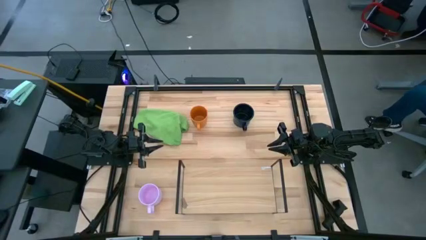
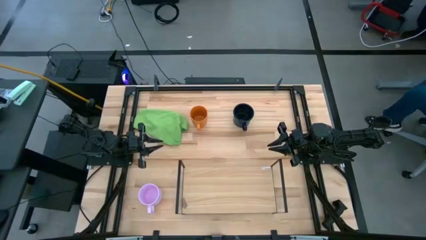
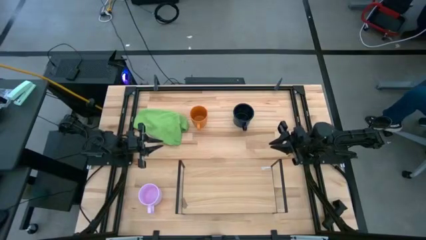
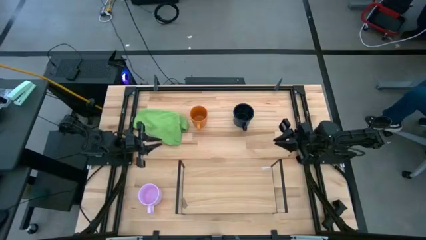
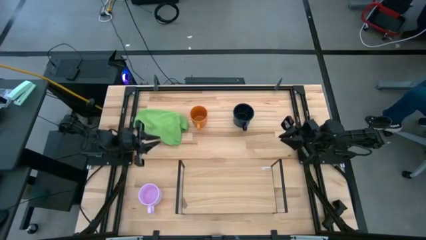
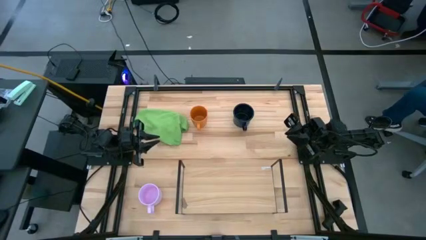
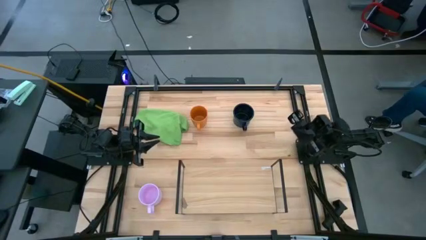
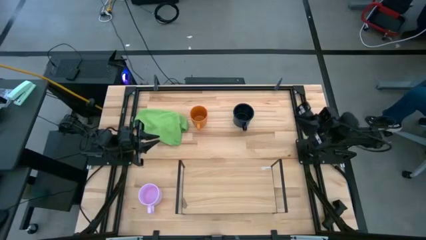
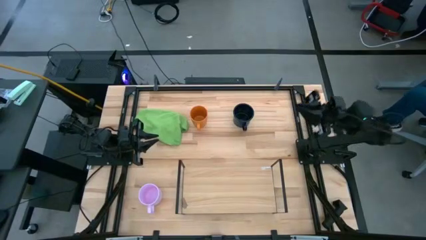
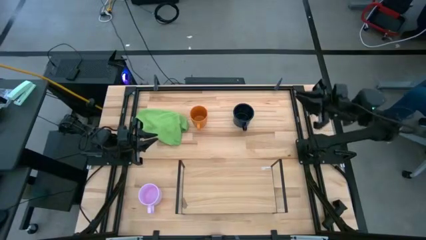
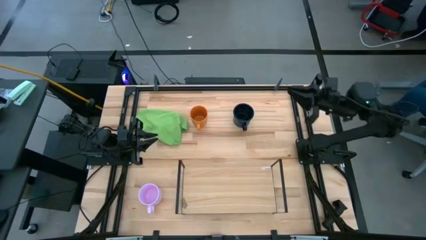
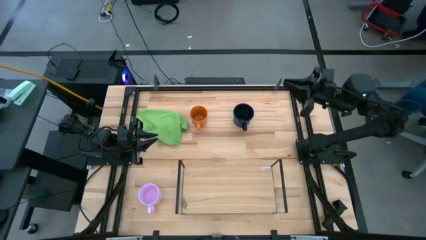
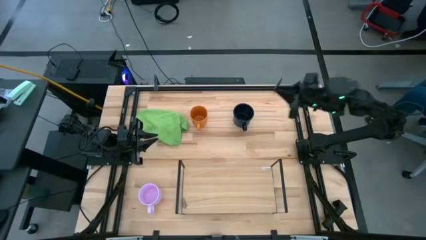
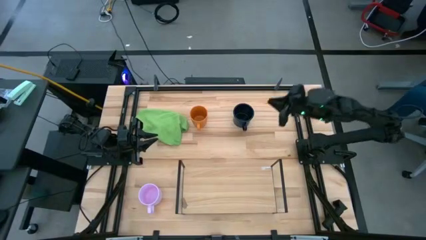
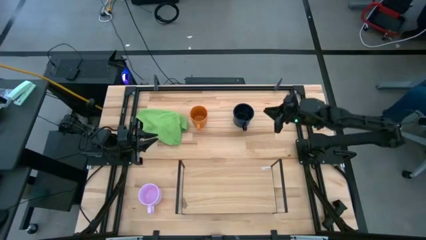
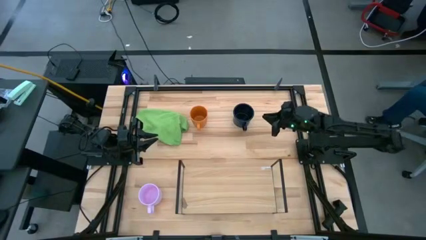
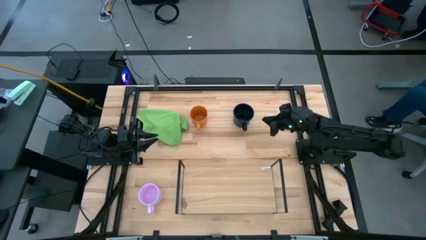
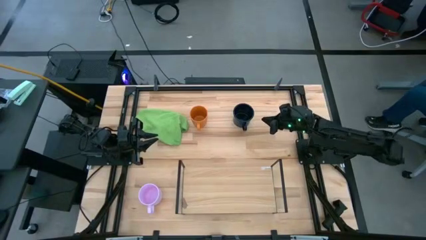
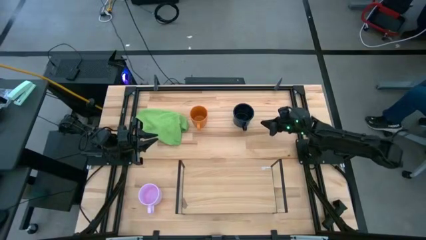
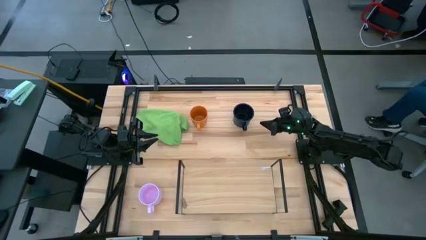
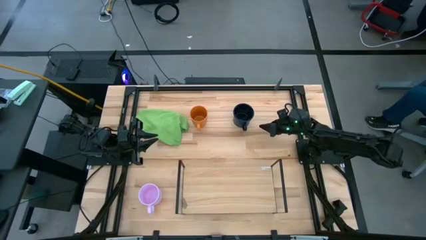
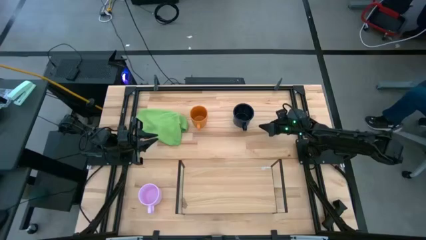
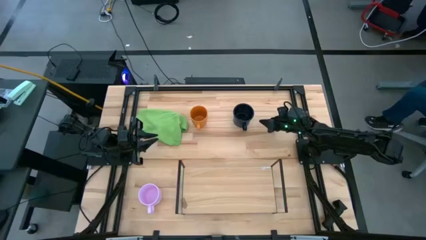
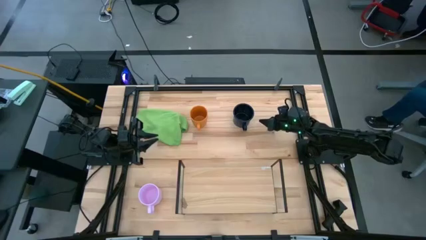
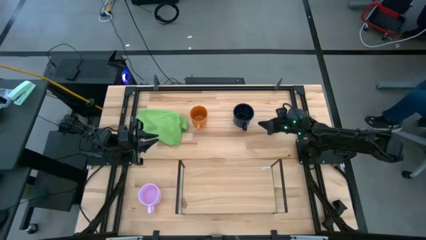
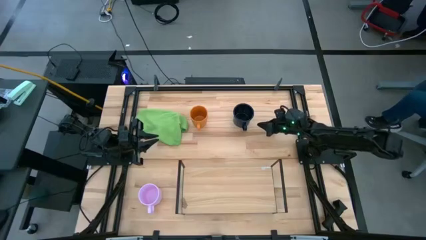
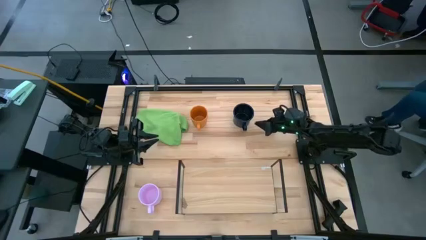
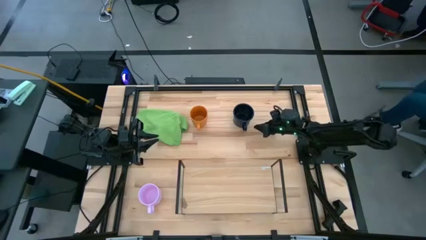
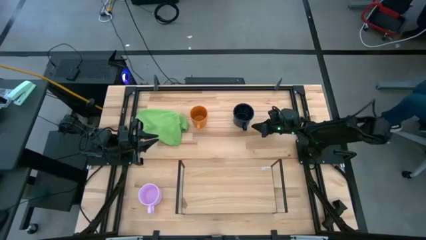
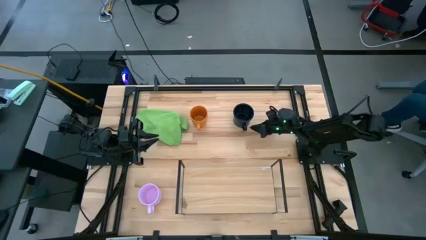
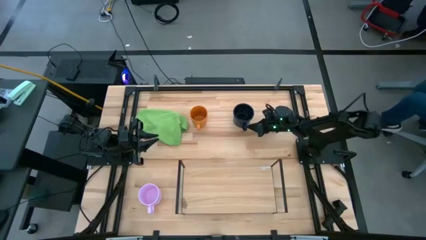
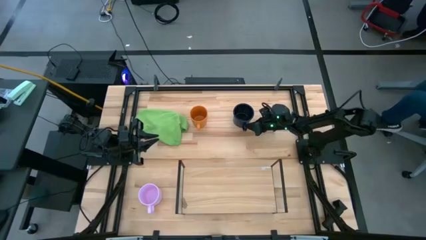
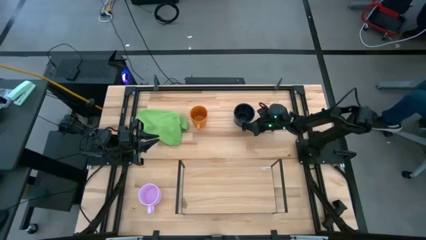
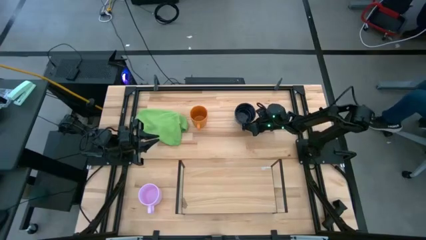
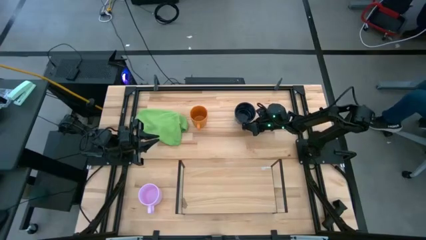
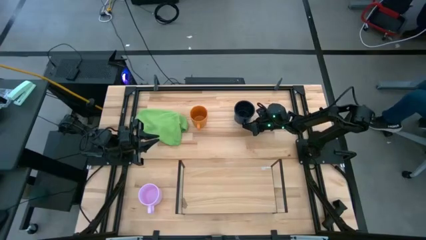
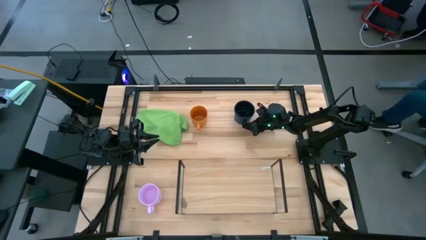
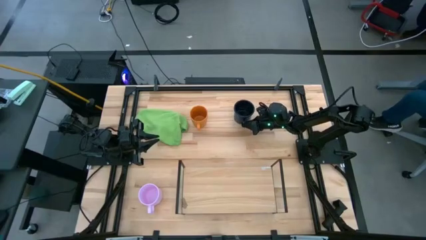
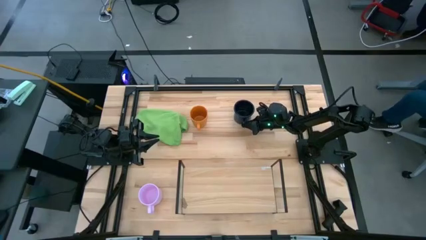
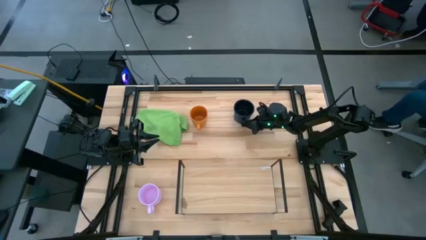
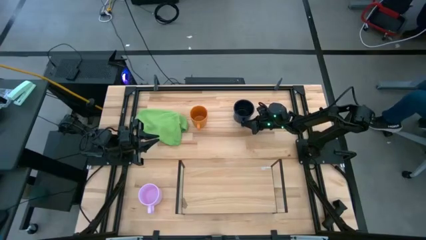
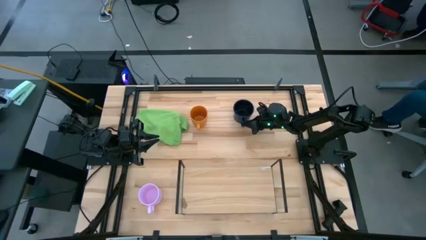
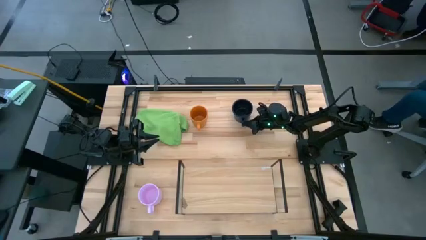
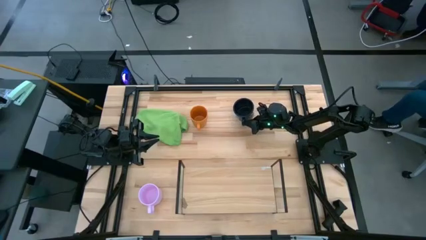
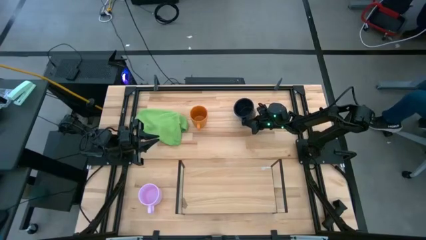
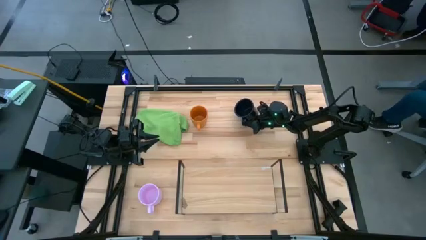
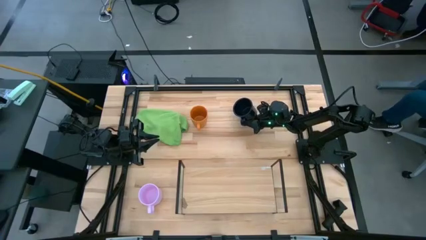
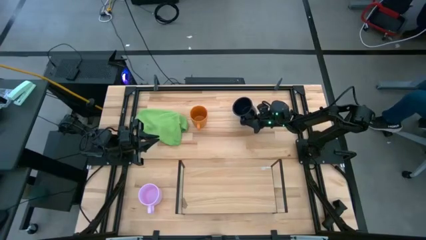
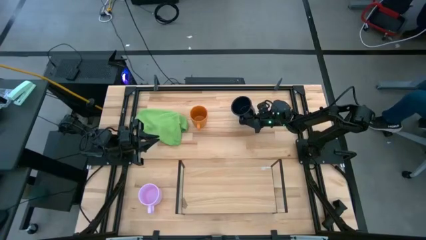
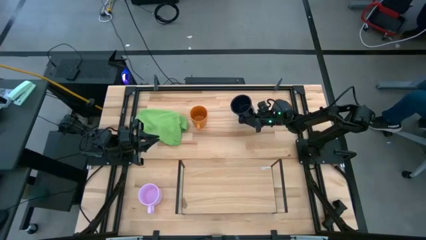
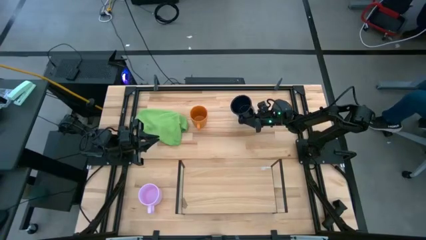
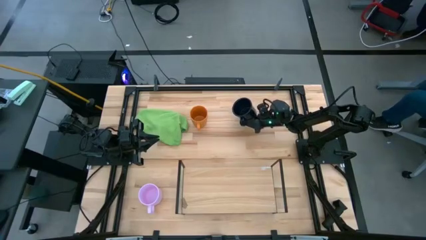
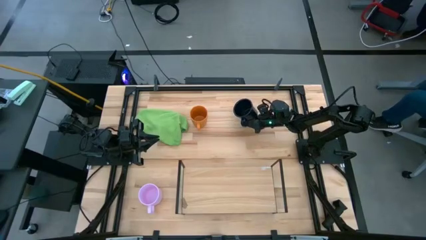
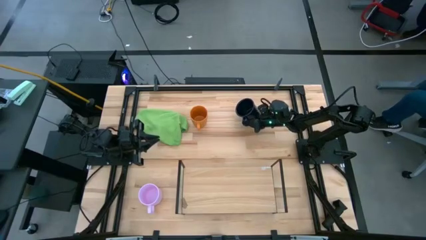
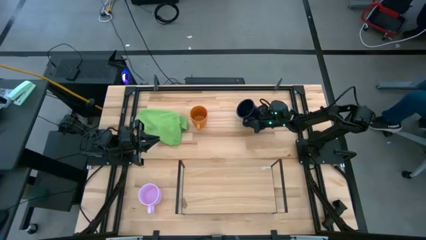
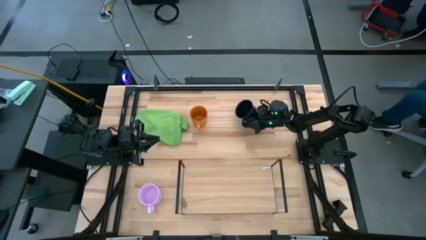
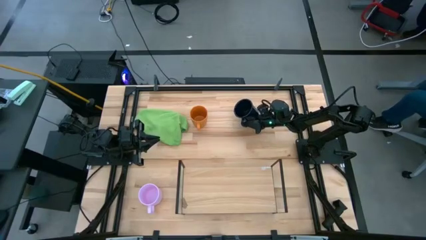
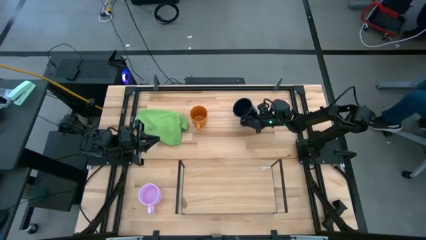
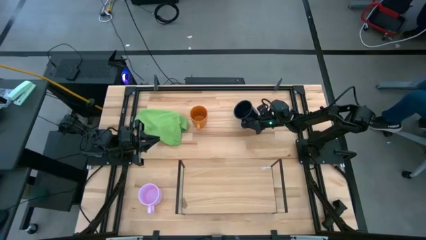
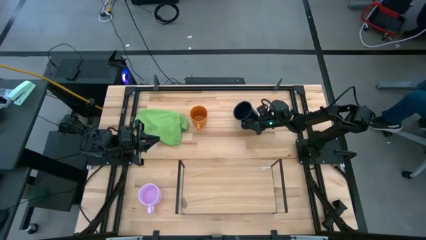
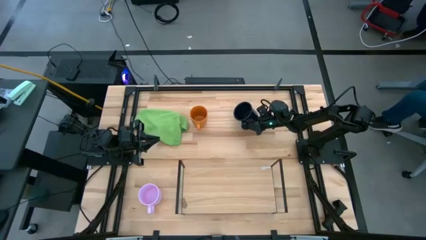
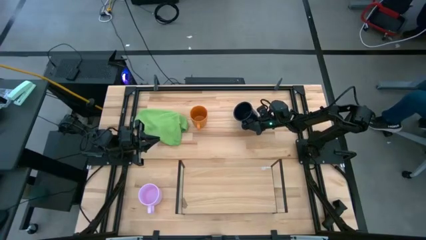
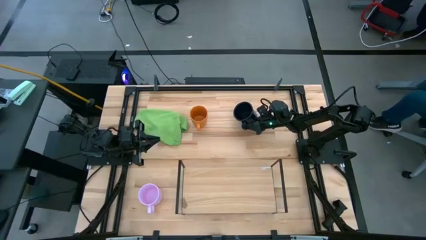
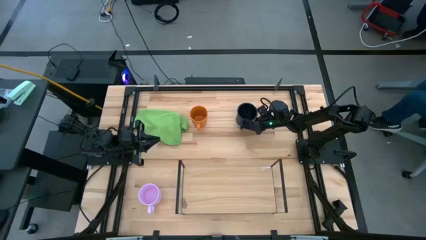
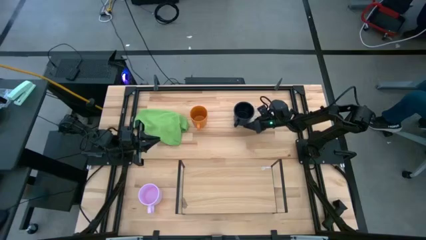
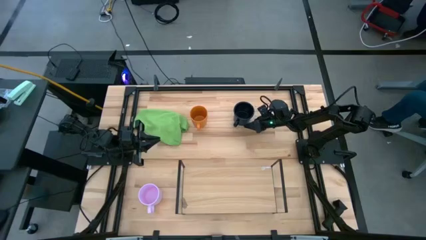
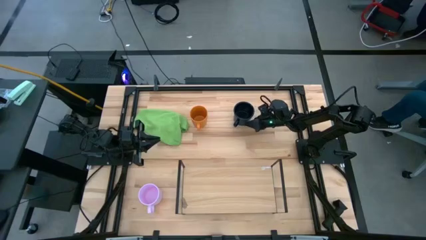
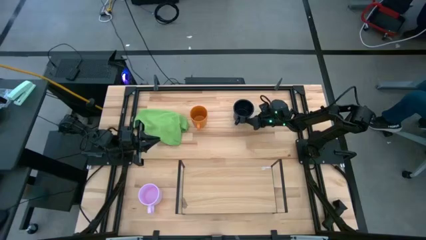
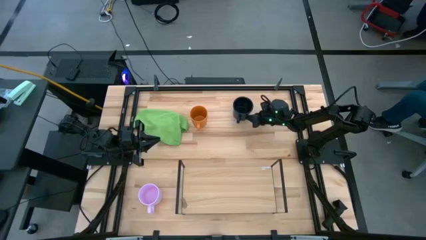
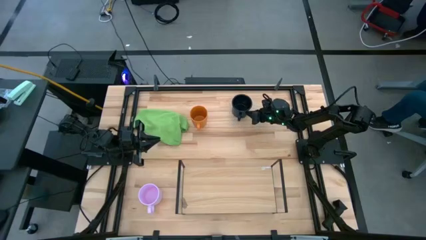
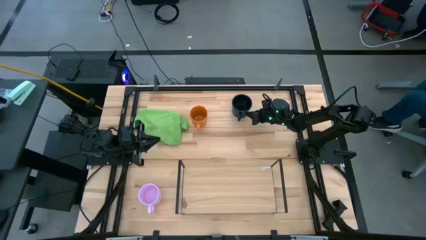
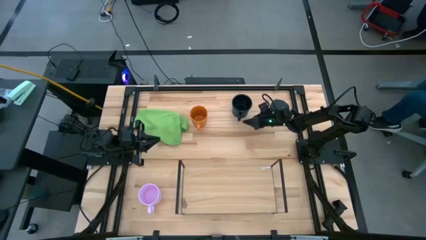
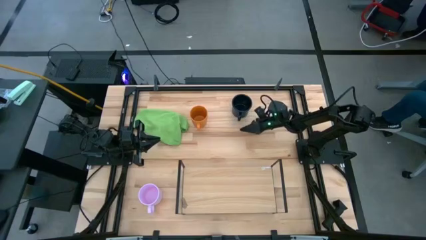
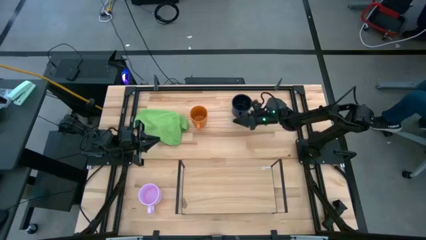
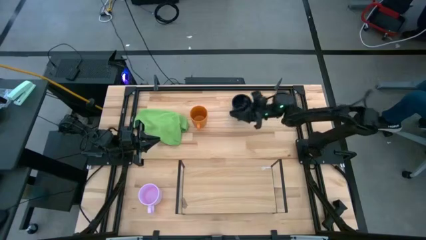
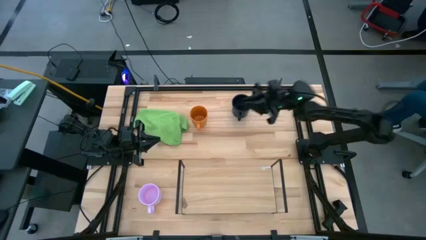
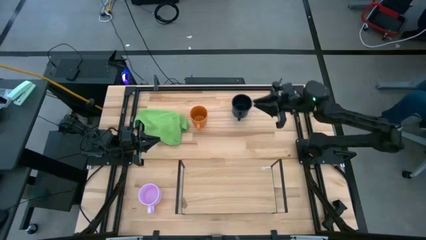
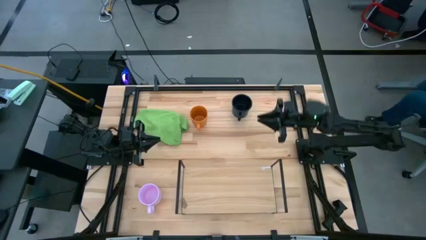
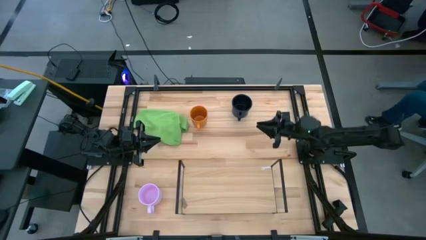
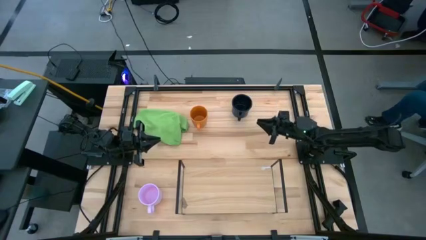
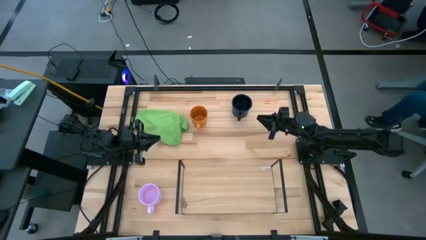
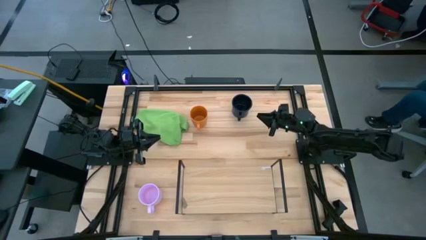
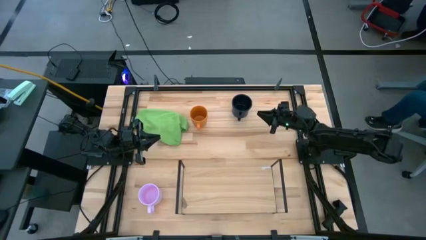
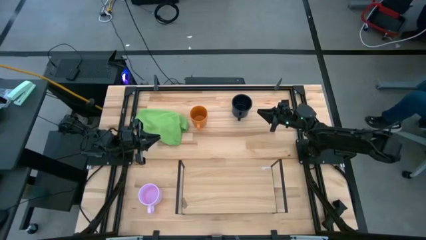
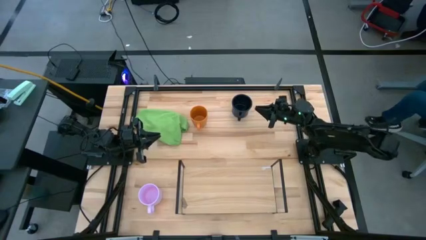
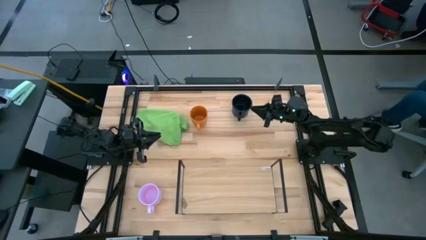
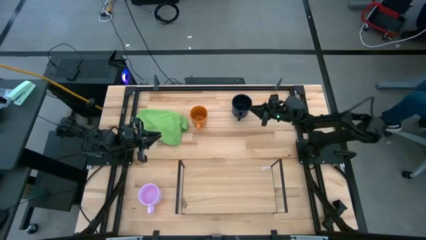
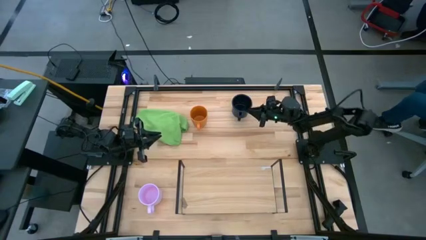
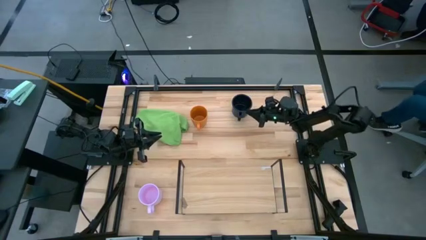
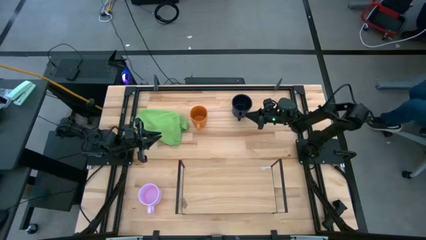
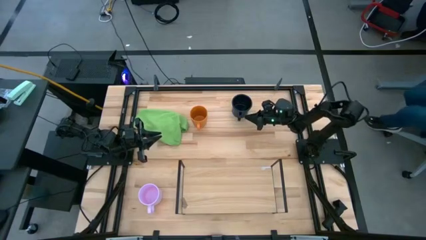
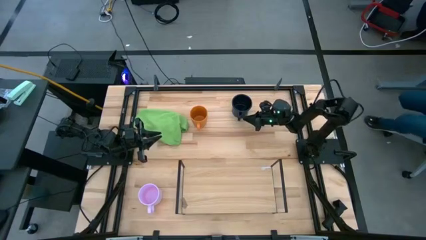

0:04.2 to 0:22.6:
Task: Stack small to large cups/mugs on shelf
Put the dark blue mug on the shelf
